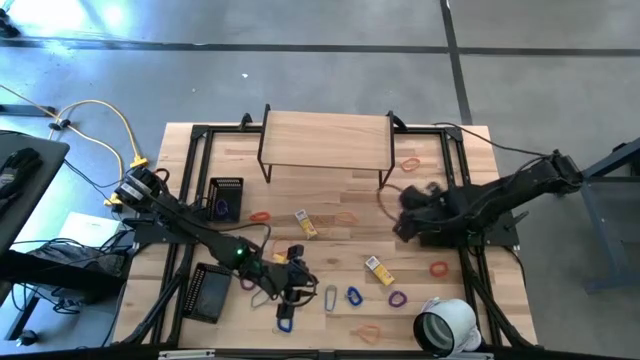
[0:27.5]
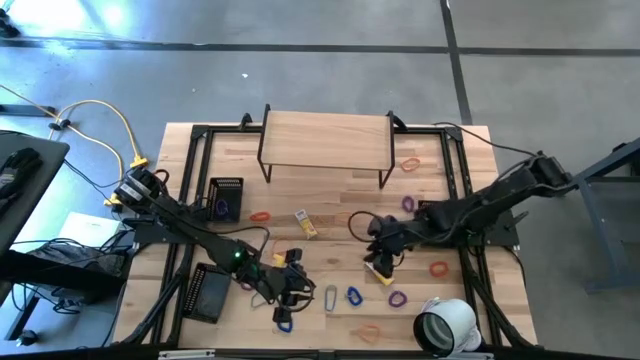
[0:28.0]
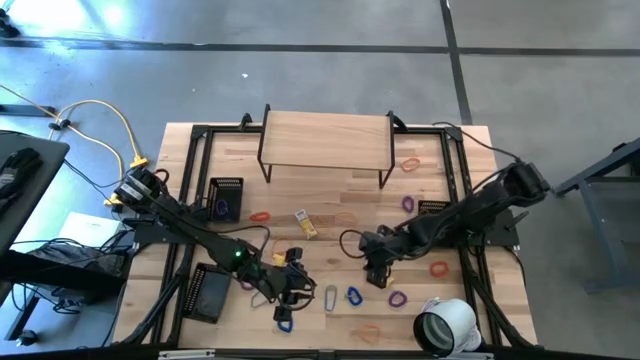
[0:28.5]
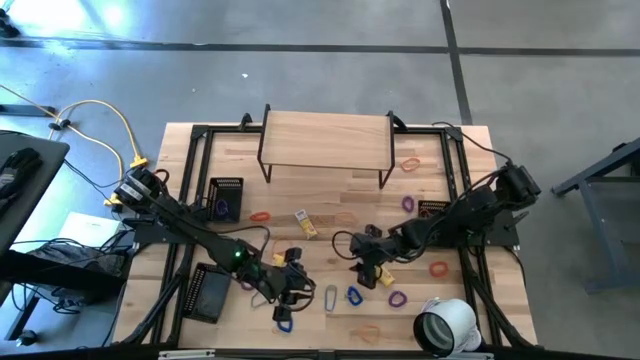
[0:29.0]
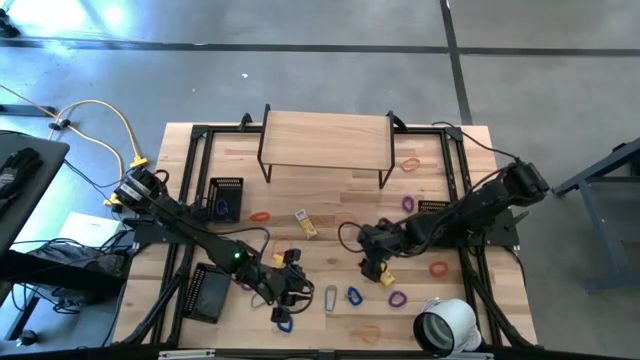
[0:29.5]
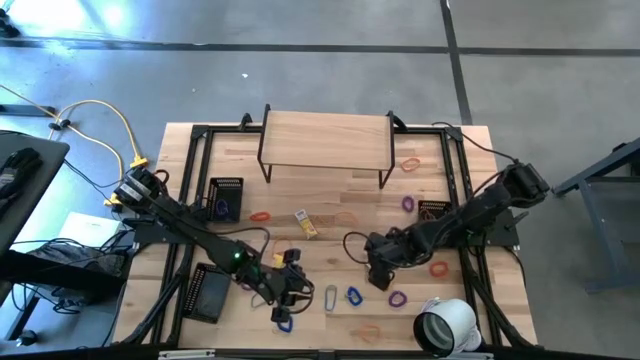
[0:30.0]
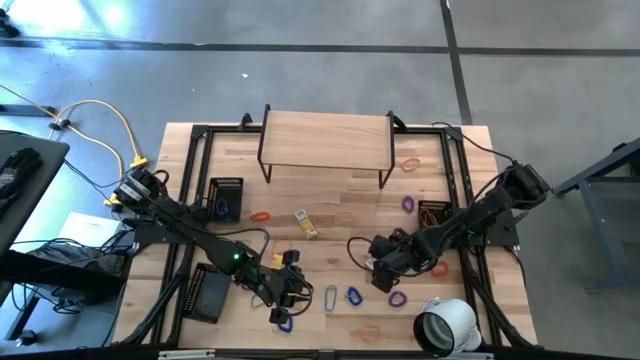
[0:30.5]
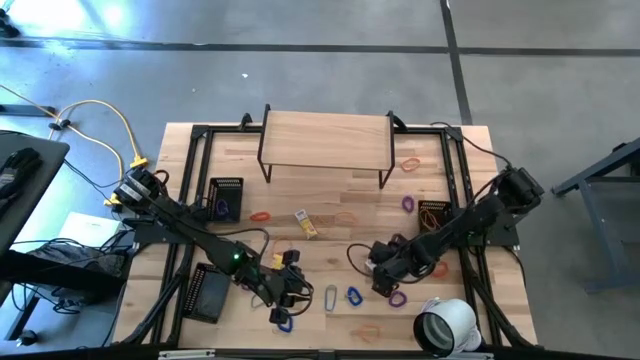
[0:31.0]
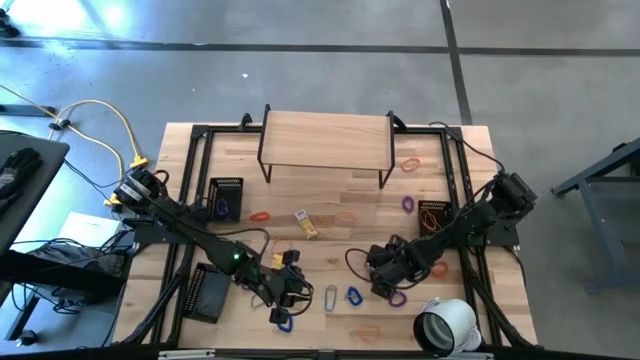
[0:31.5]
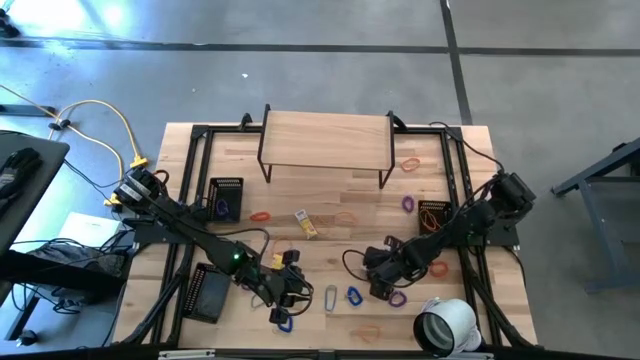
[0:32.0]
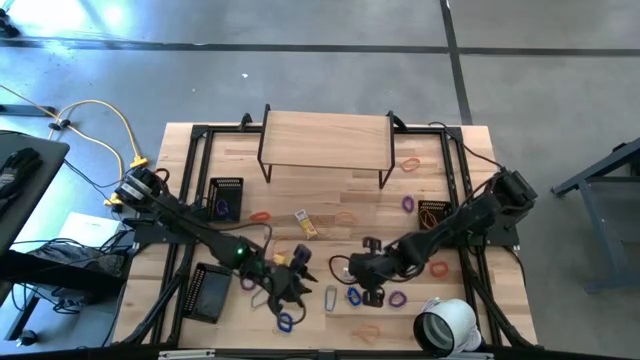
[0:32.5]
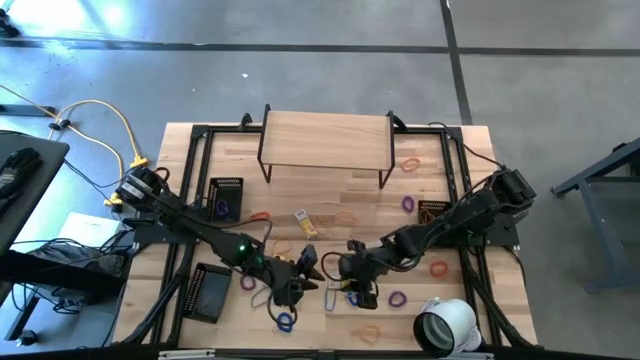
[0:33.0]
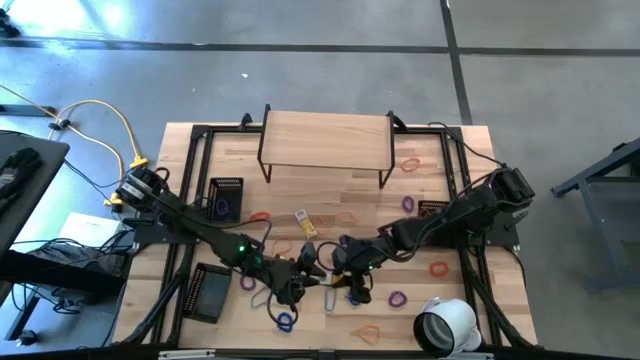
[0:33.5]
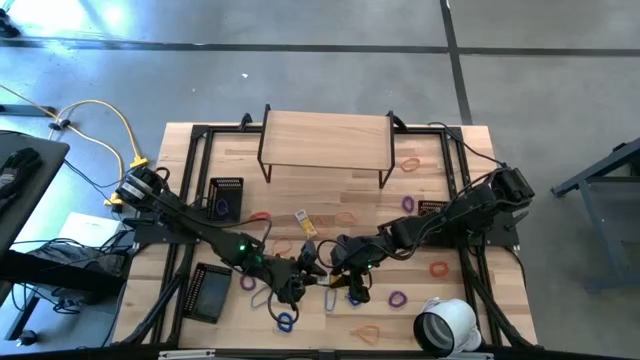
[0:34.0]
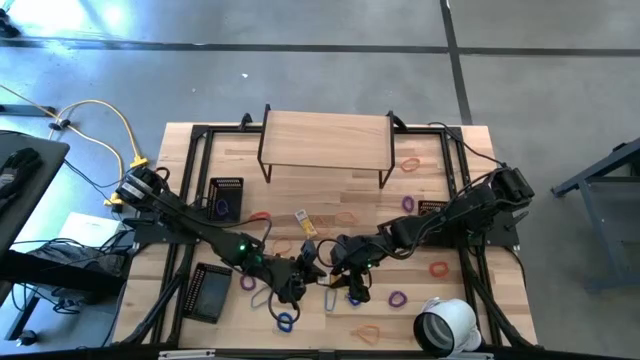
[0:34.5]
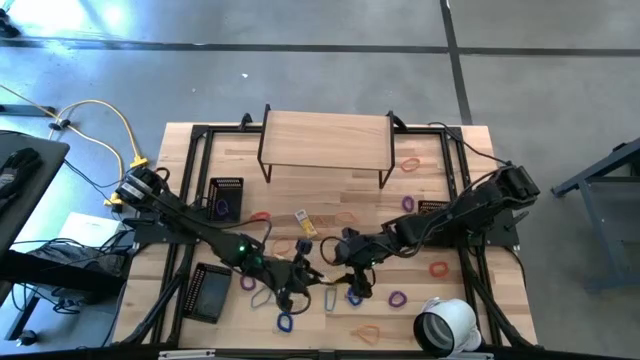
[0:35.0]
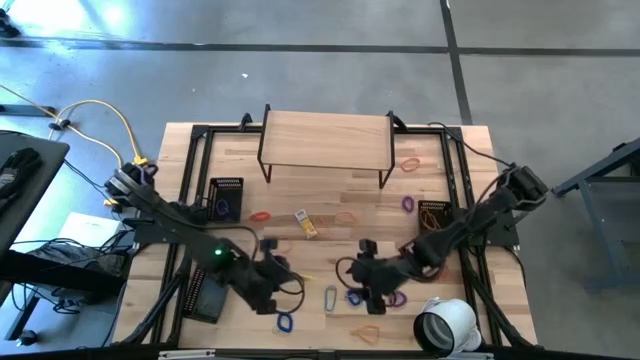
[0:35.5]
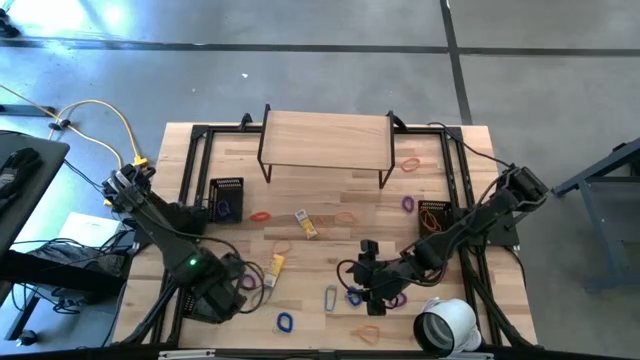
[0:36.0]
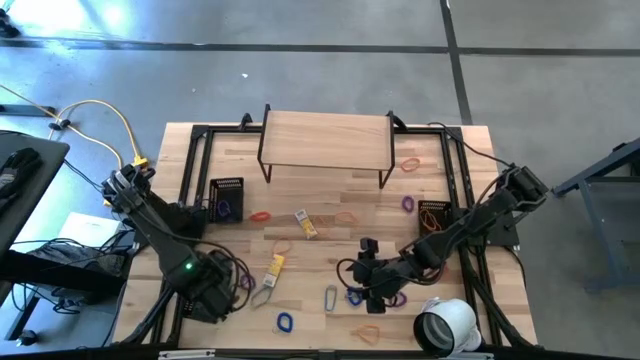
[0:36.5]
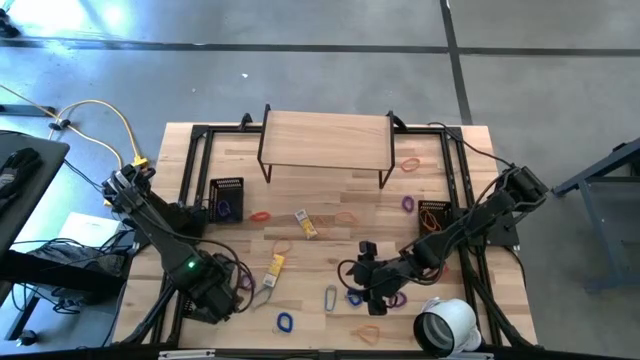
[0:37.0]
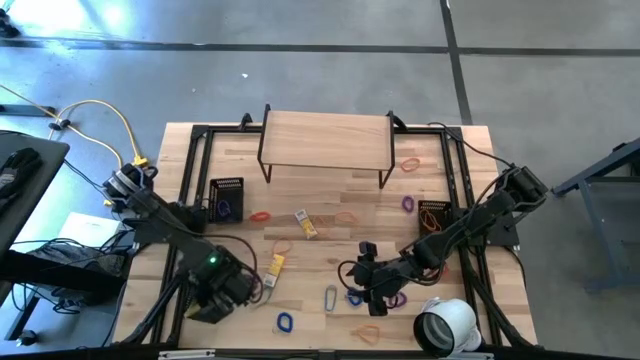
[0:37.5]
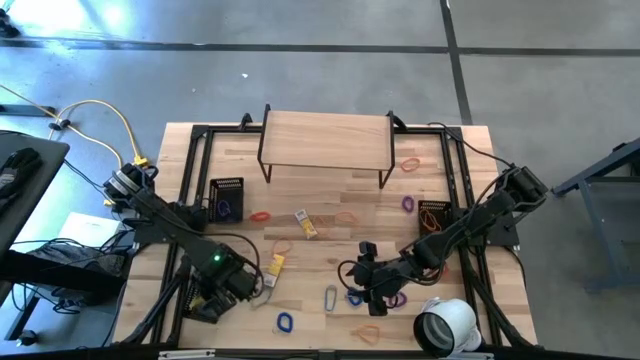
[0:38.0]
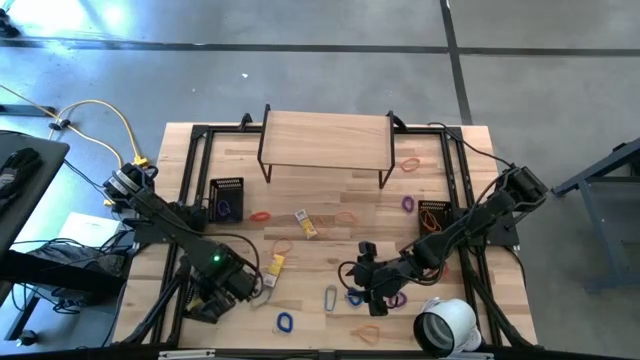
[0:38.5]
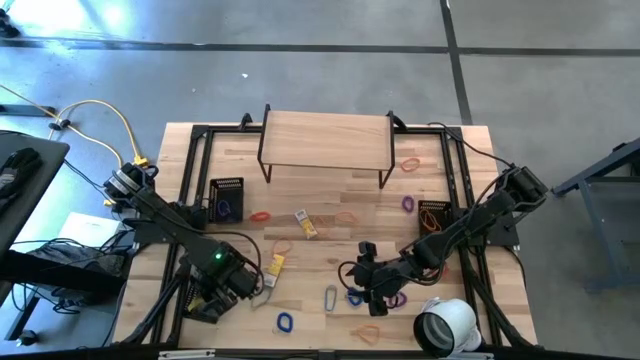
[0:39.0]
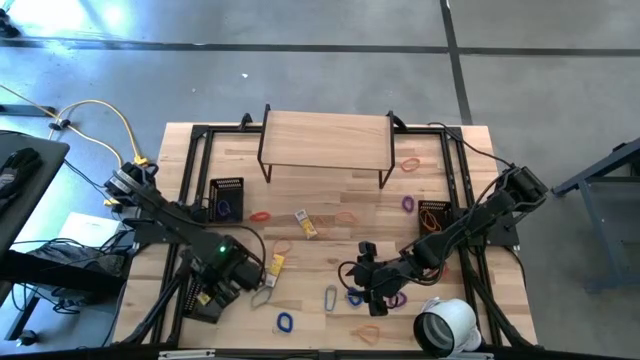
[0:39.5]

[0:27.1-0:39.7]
Task: Pick & Place Office Desk Supplies
Put the yellow crayon box into the bottom black bin

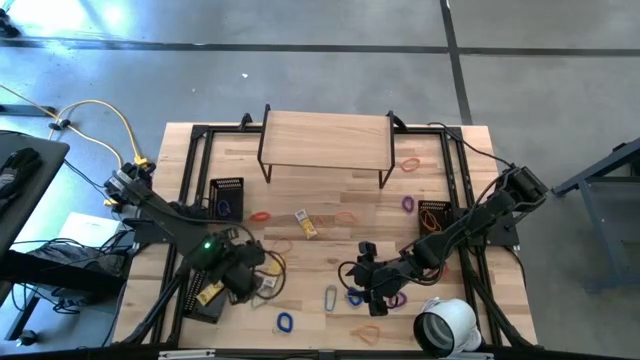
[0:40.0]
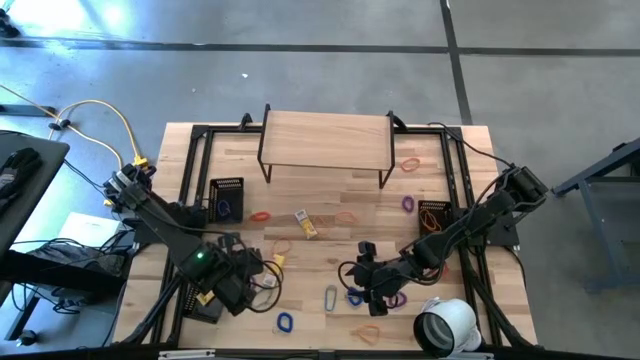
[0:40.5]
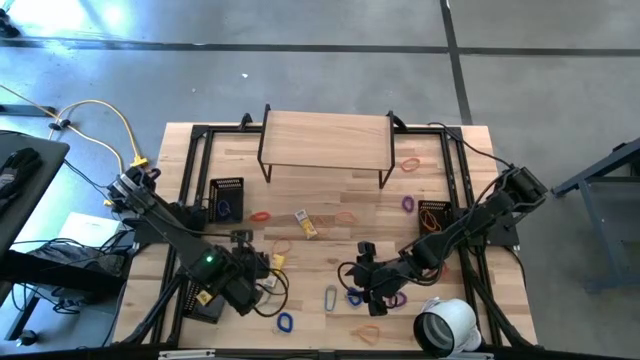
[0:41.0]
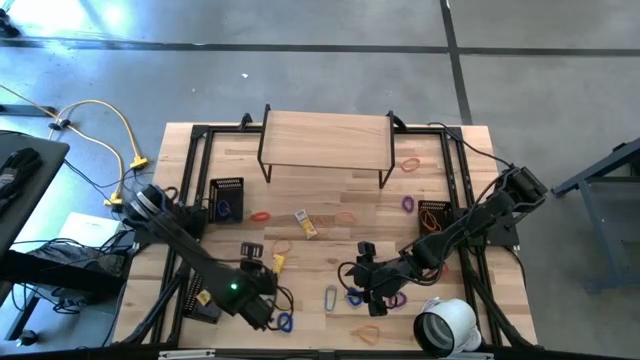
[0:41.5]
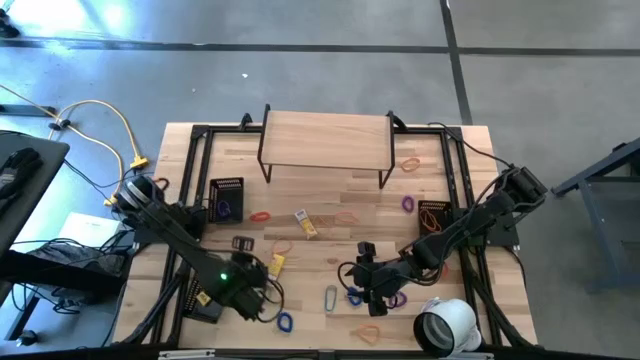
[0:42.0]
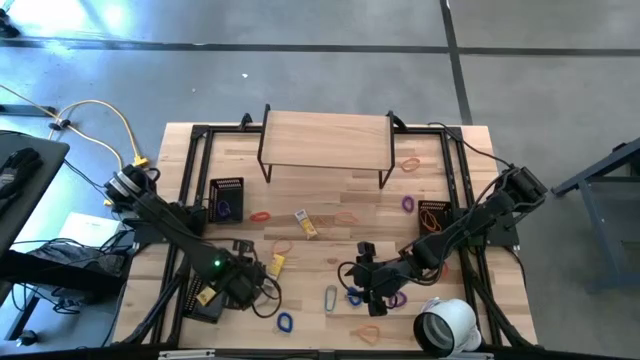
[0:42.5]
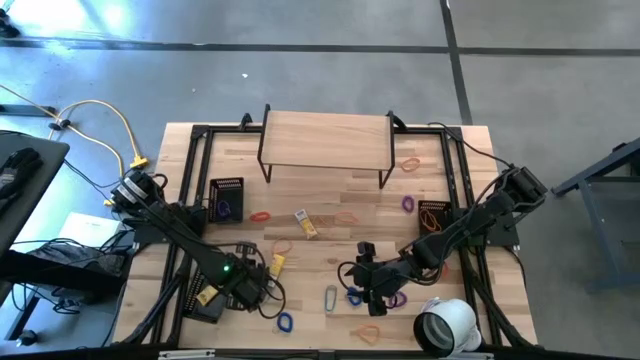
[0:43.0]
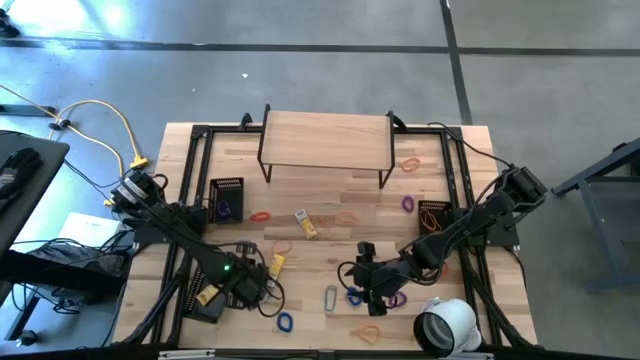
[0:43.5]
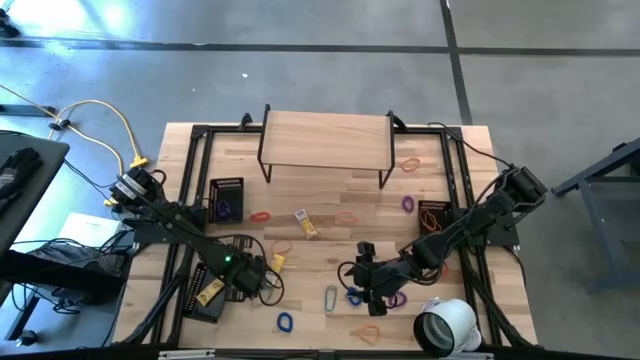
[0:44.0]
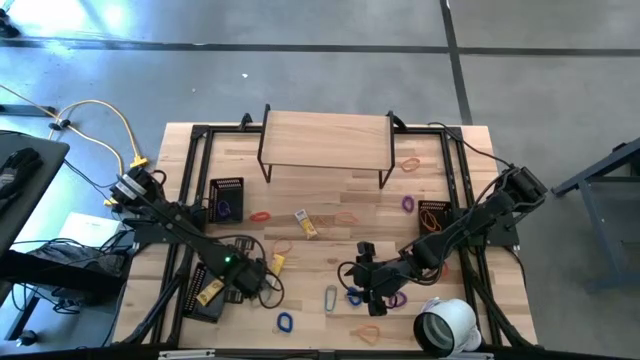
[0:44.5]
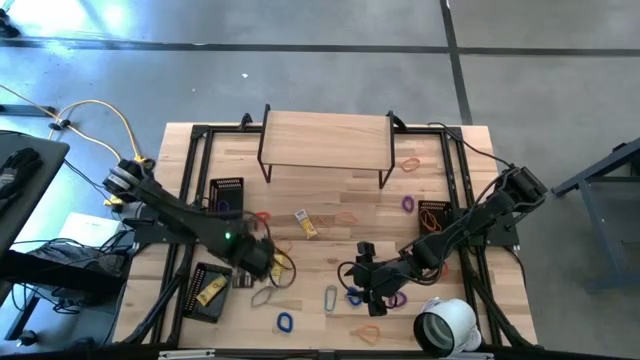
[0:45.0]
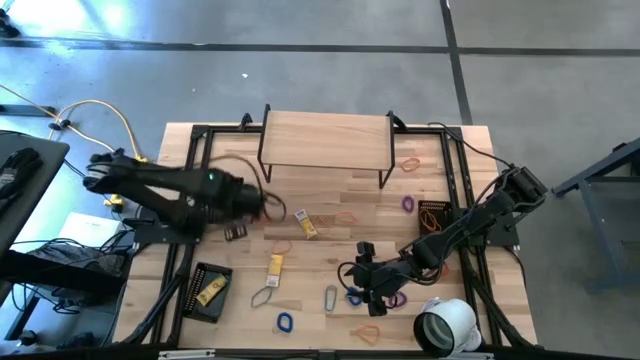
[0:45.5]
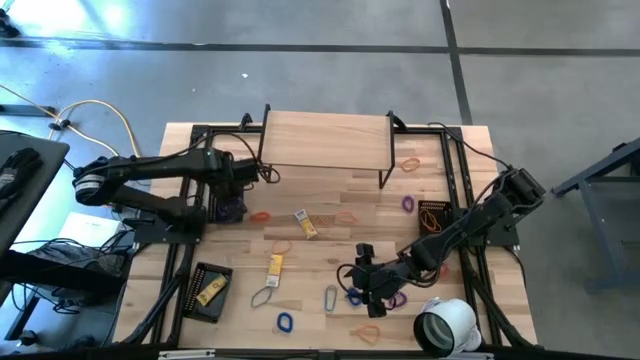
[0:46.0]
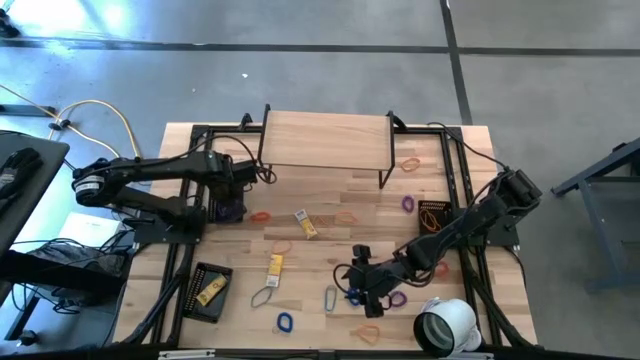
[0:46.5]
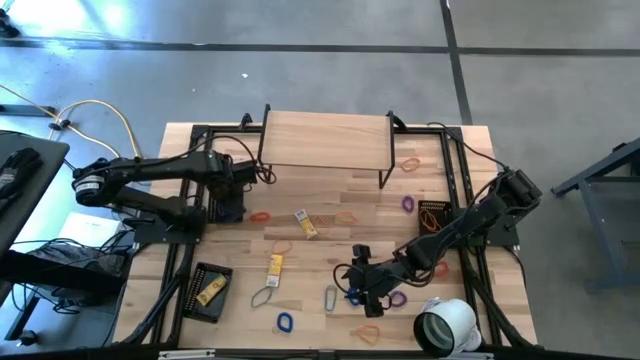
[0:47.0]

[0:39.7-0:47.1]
Put the violet spring keychain into the top left black bin

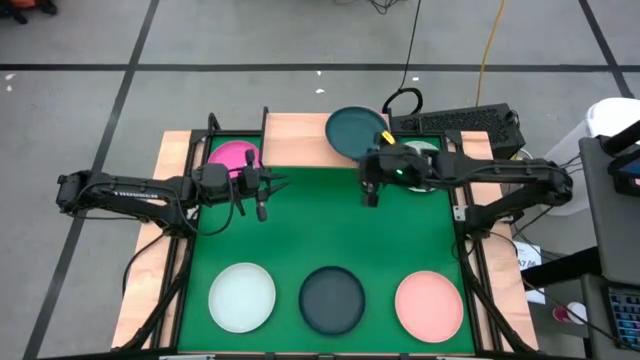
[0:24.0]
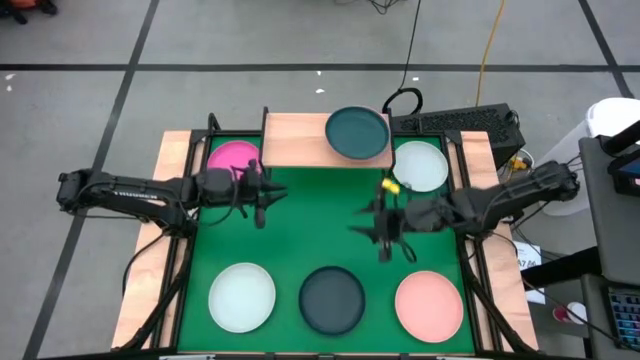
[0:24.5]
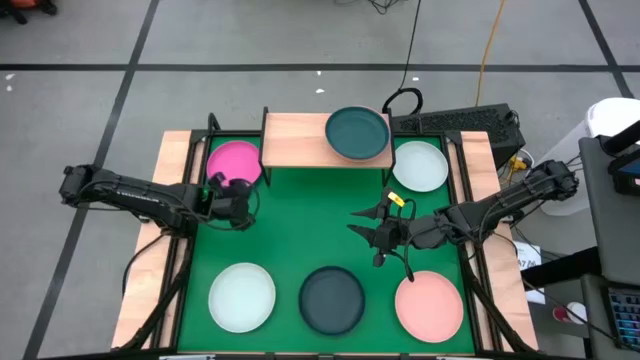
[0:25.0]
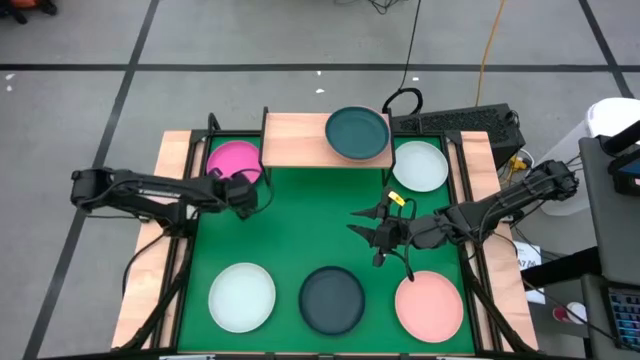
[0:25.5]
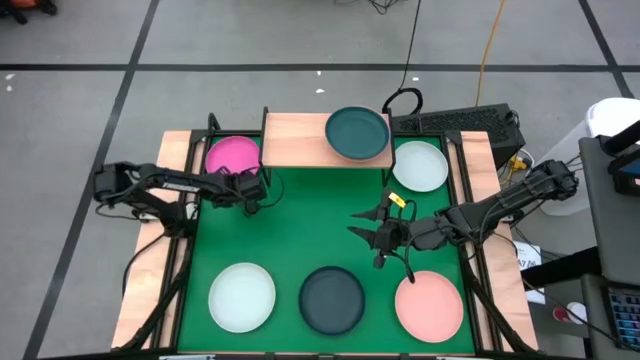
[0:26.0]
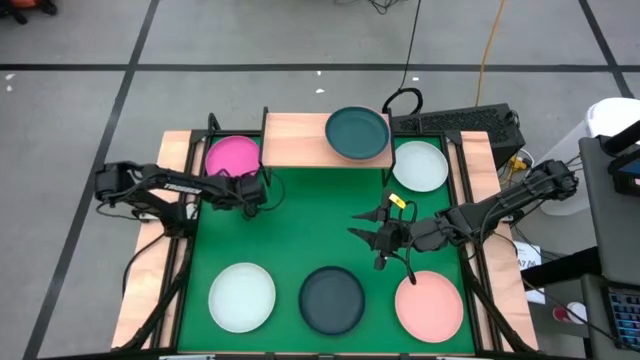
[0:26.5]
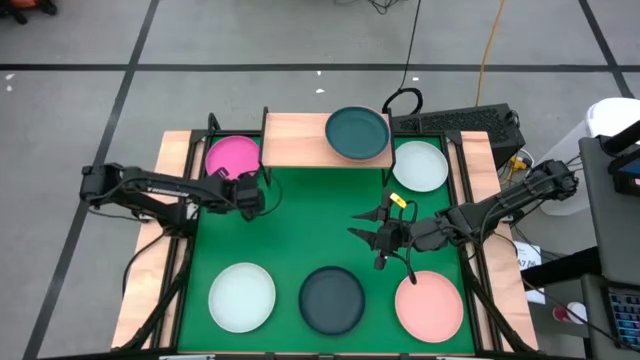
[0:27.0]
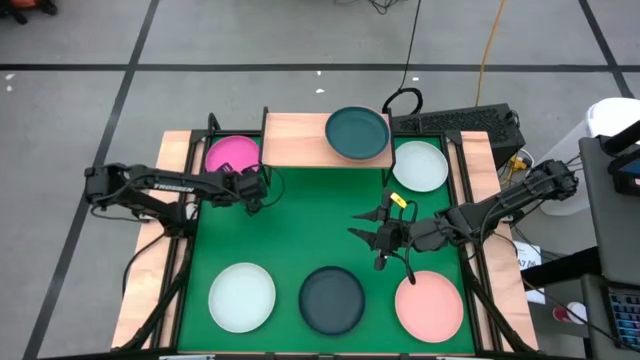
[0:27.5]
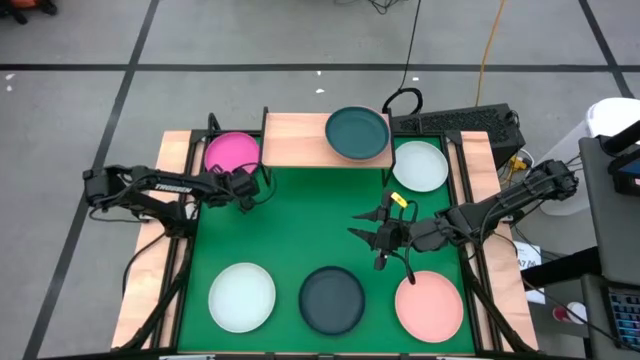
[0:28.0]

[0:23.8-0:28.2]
Task: Place and stack plates onto a shelf
Stack the pink plate on the dark green plate on the shelf
